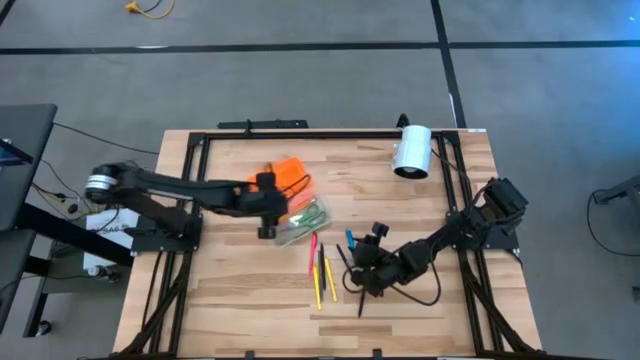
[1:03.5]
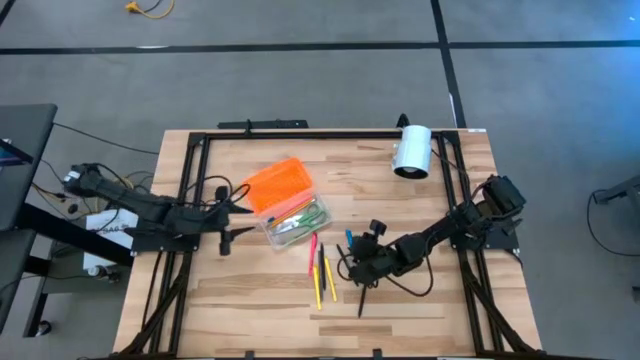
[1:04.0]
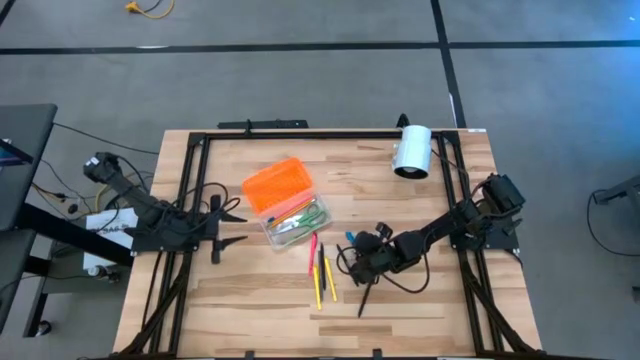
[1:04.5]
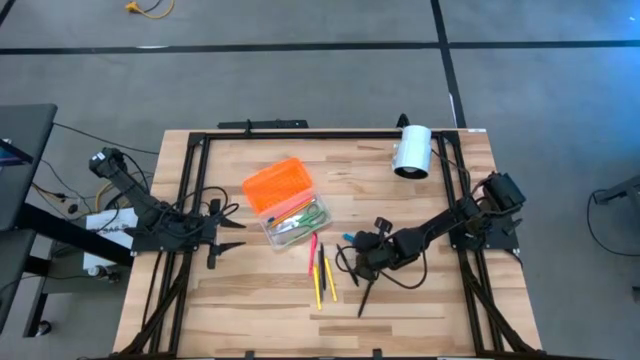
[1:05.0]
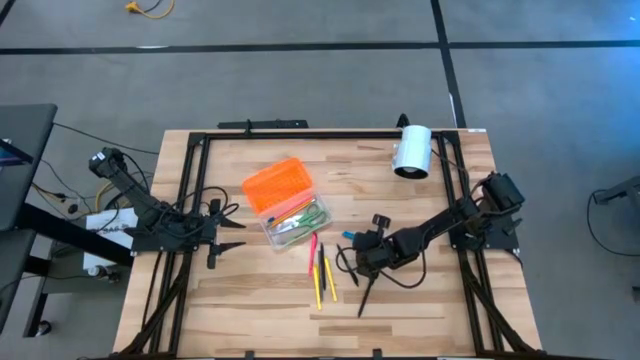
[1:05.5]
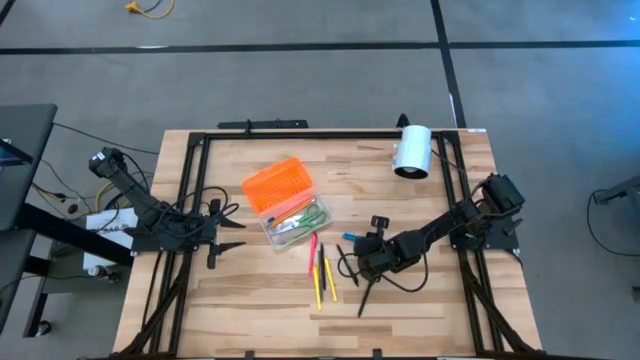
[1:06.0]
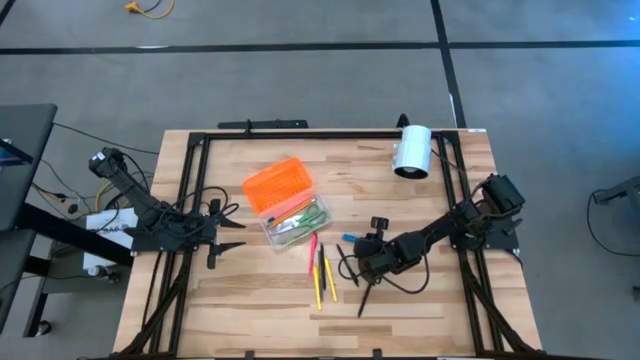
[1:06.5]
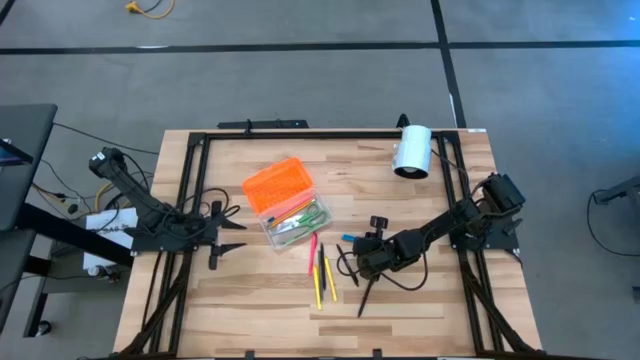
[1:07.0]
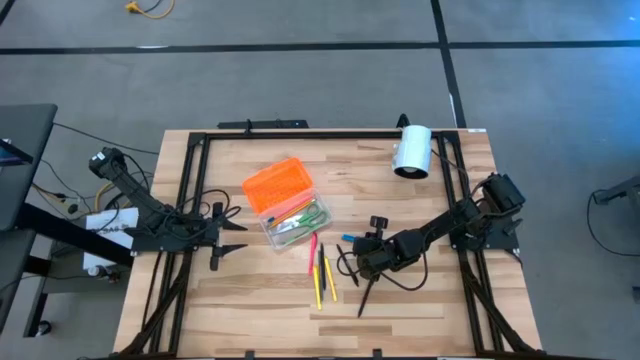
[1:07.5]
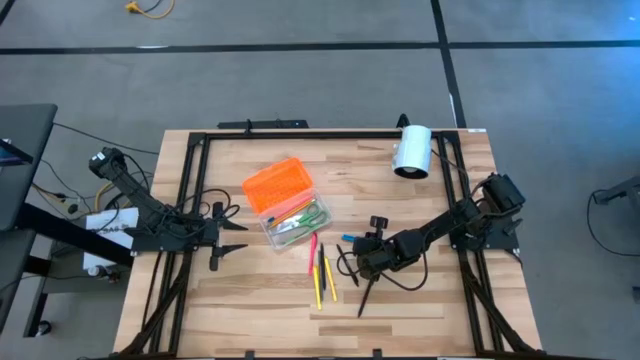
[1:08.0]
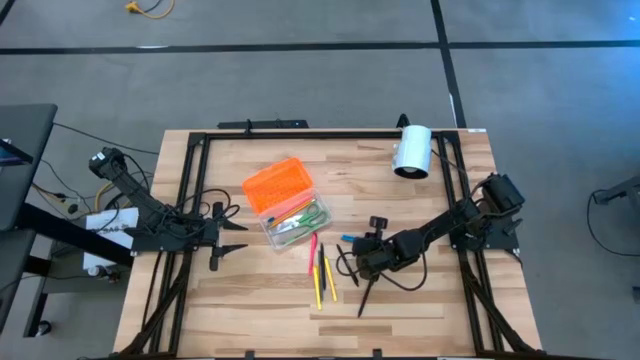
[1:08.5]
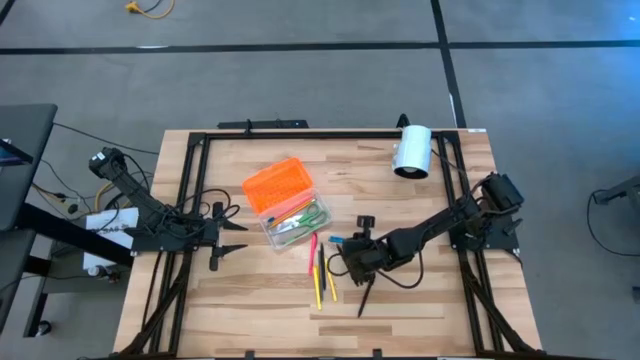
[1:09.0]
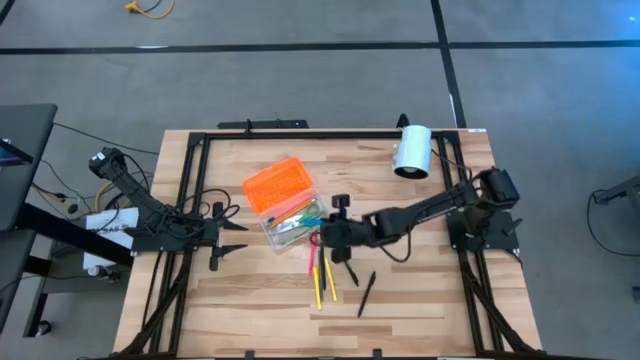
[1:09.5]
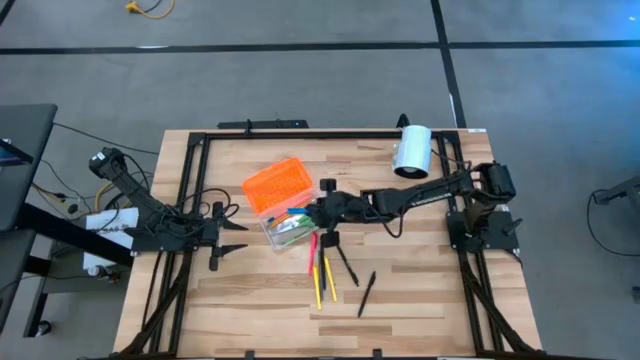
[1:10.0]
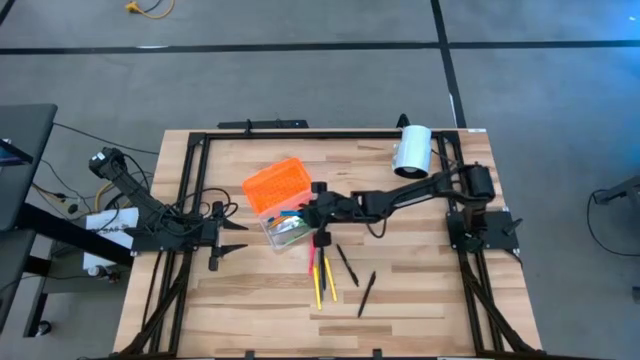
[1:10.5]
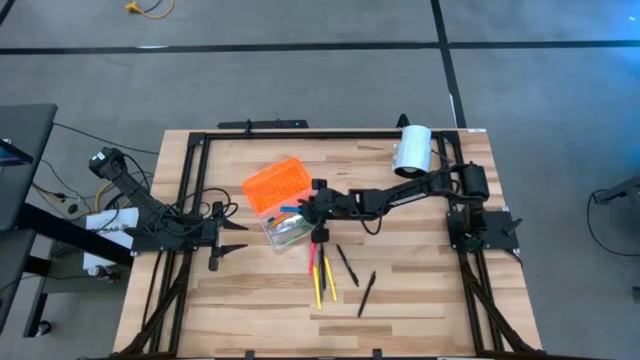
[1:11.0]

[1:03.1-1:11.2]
Task: Pick & place school supplies into a supply box
Put the blue pen into the supply box

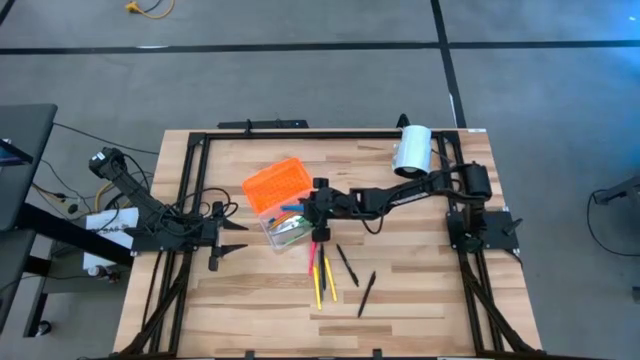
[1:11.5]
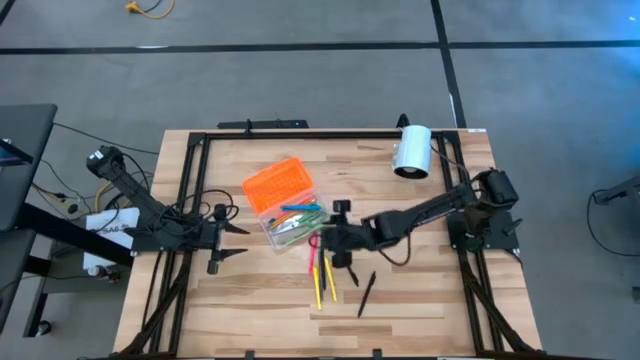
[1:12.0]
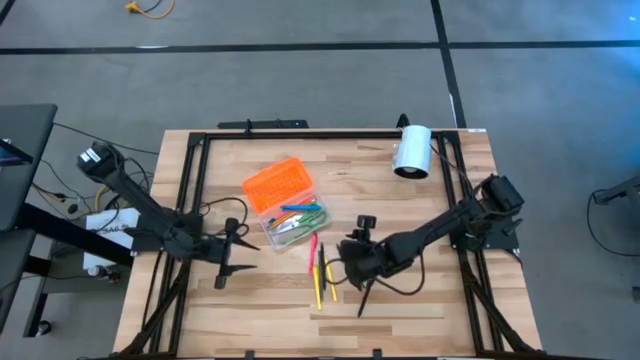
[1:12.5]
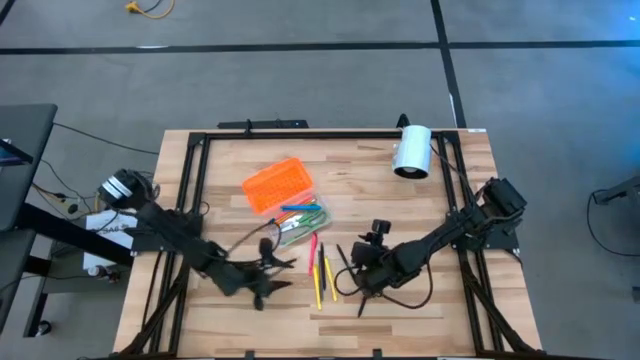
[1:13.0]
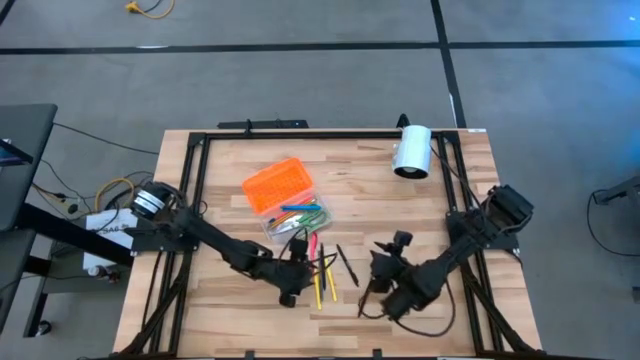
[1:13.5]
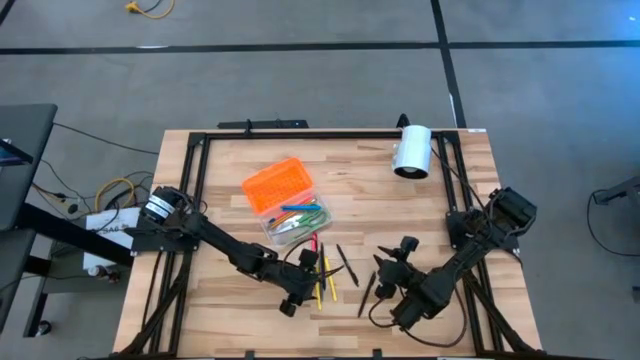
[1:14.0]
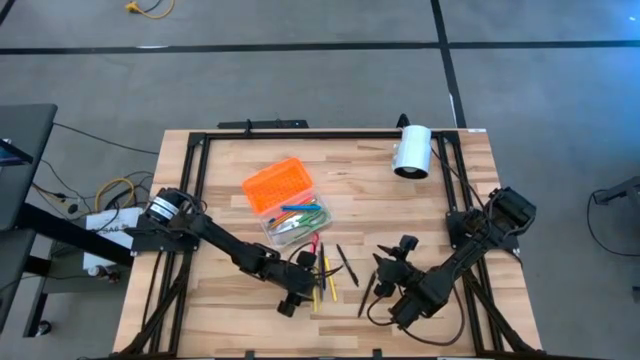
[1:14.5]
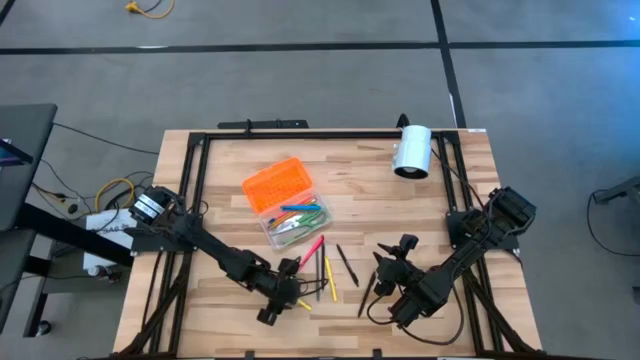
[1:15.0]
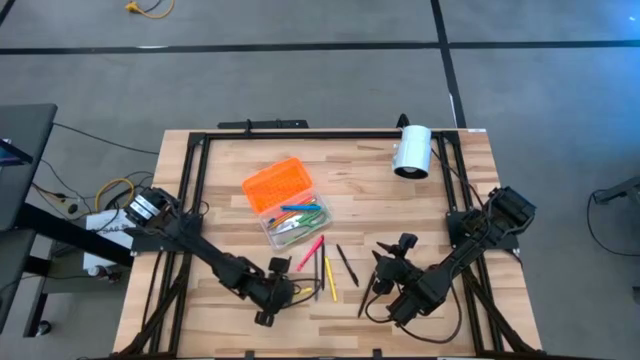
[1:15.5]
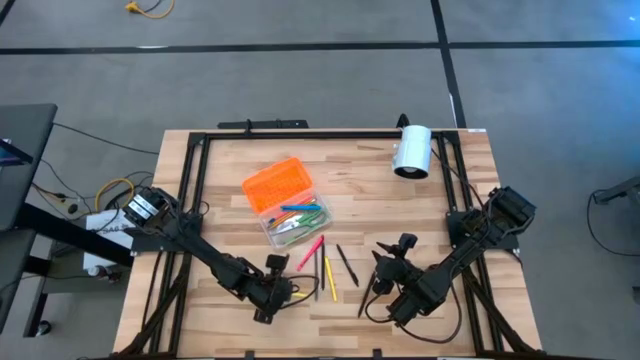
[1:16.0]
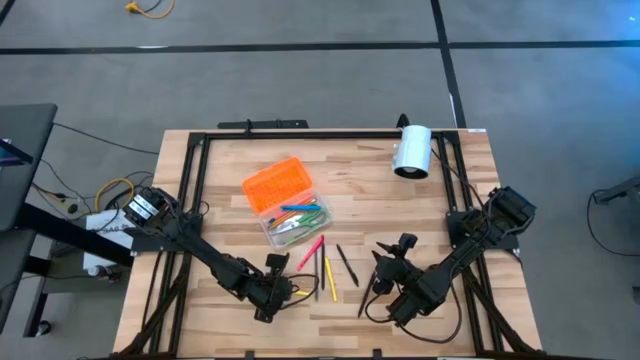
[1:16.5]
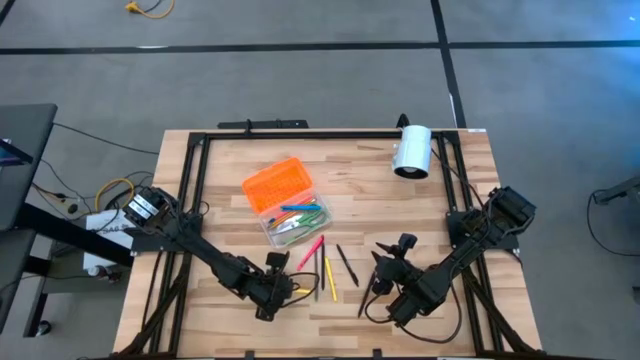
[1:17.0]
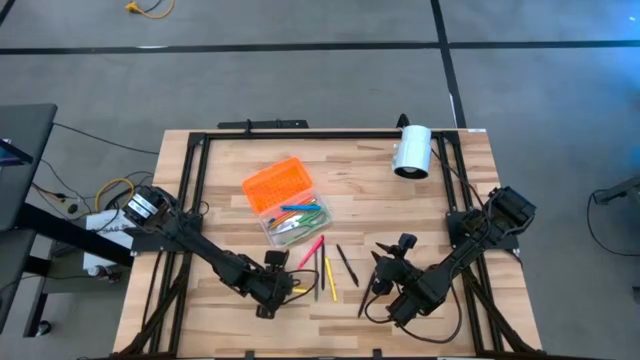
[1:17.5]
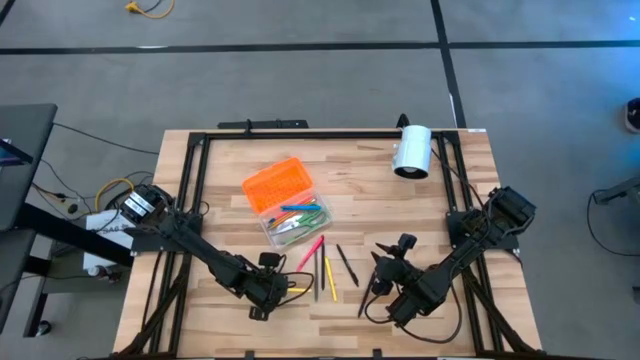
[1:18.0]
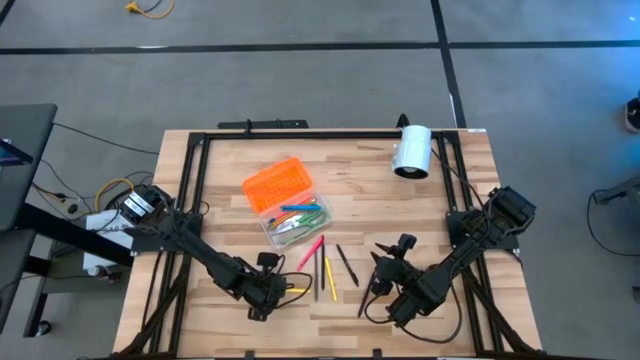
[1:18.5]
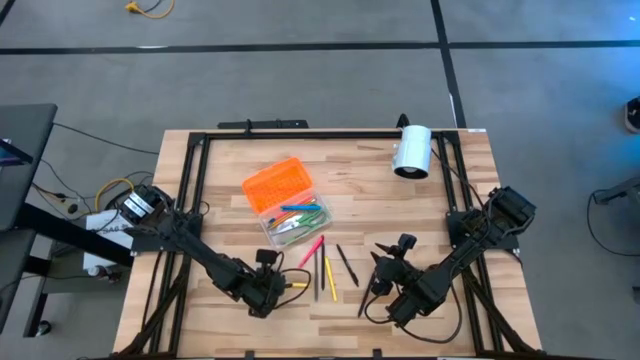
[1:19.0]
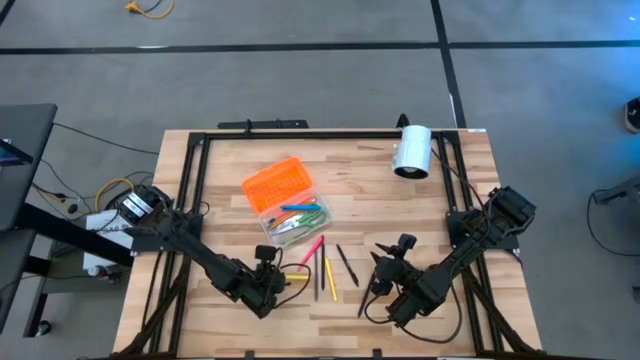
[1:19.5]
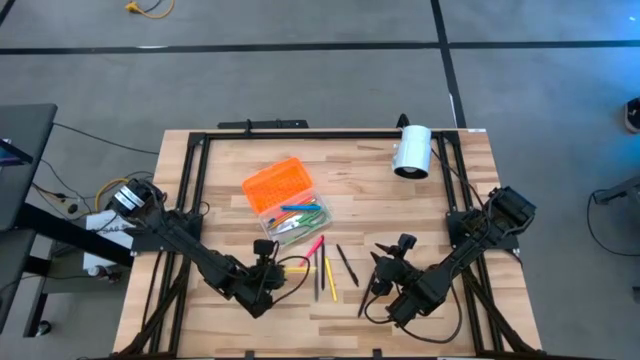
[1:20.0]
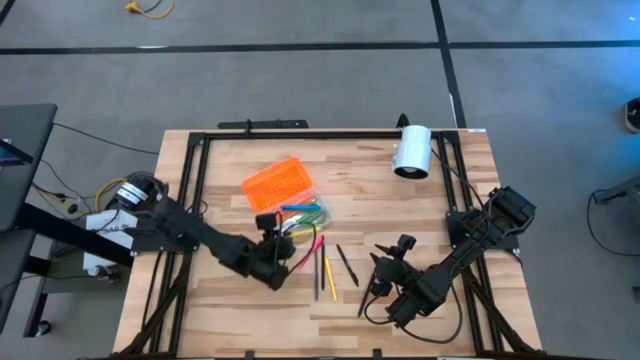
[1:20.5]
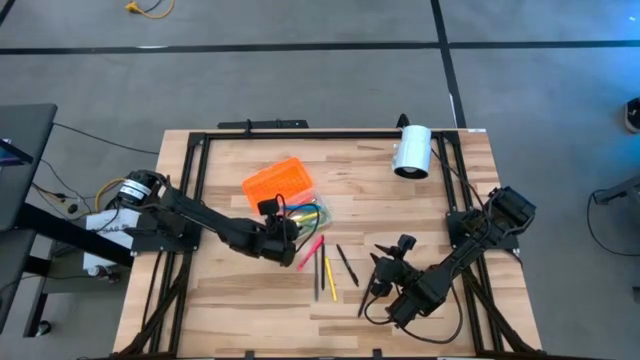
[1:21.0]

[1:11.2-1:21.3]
Put the left yellow pen into the supply box

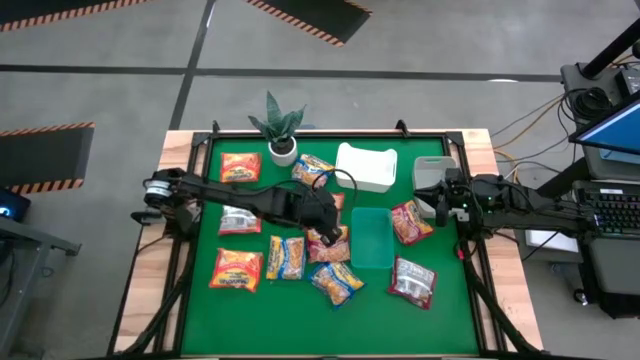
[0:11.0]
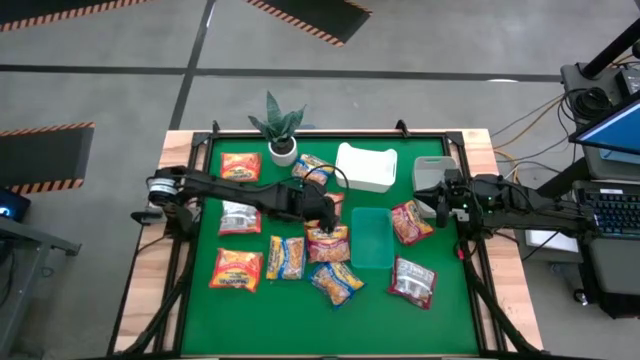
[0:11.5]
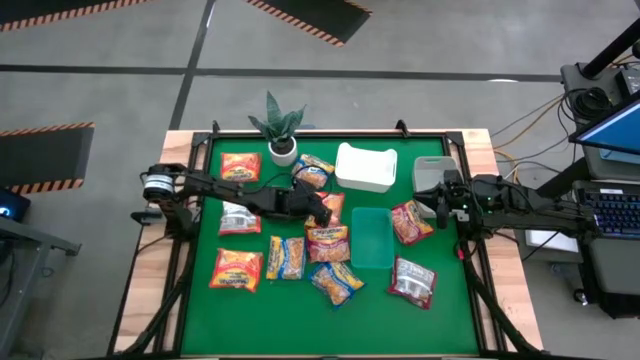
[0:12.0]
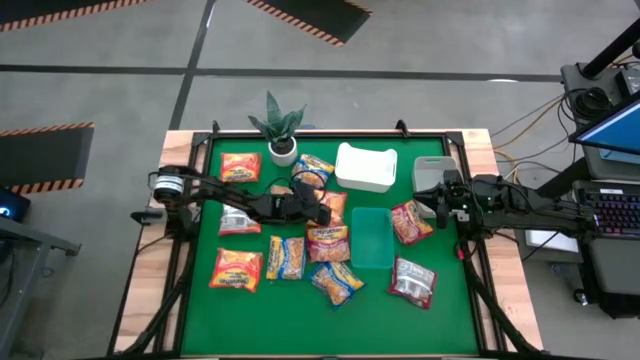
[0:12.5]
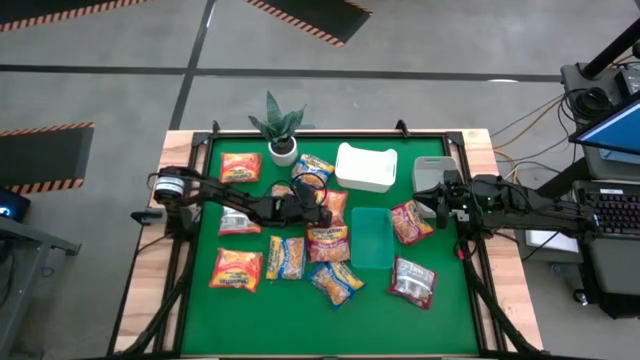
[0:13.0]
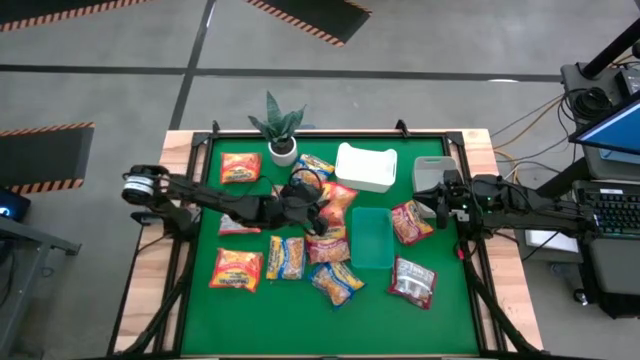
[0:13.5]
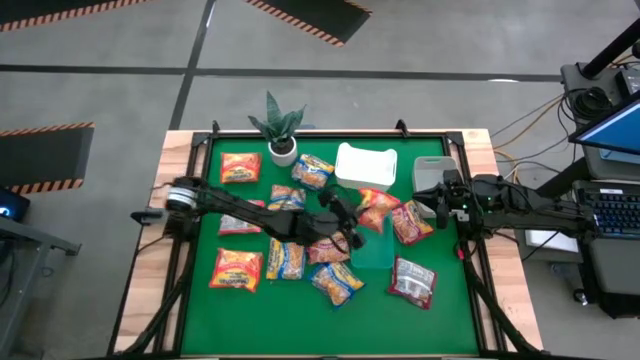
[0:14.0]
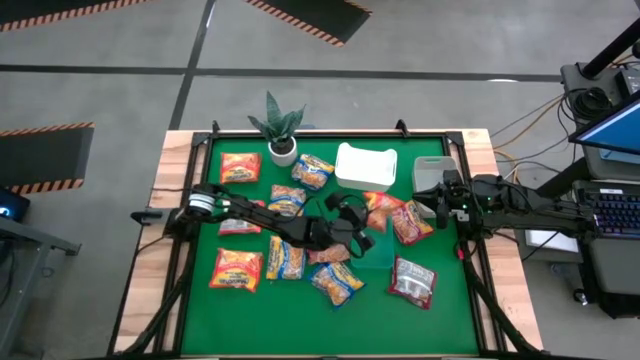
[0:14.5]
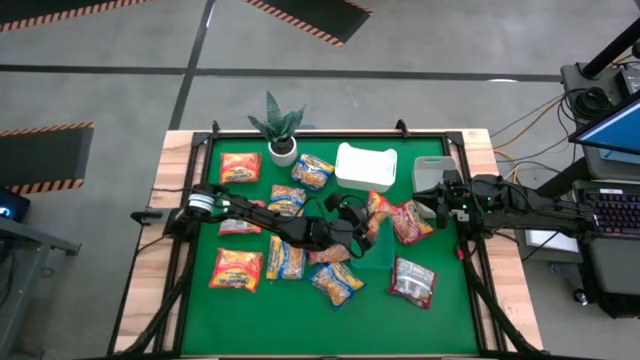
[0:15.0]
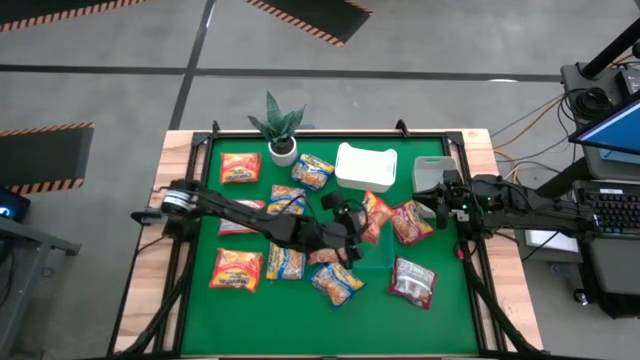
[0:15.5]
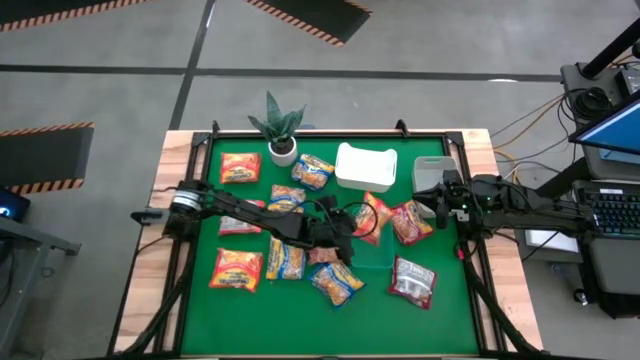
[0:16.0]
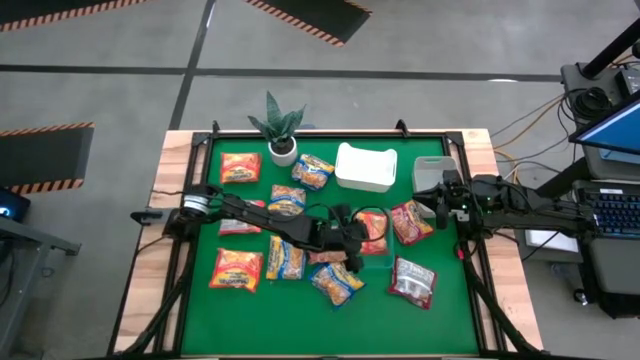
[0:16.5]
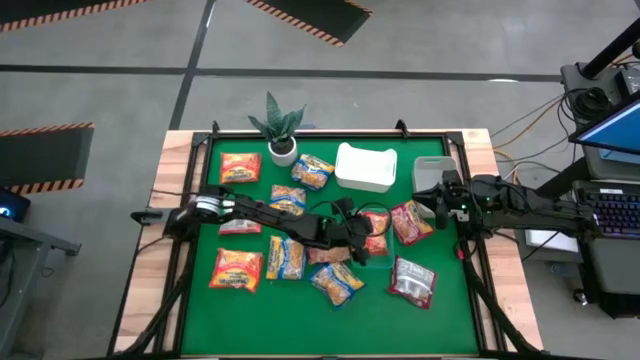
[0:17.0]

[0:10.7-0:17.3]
Task: Sort Maruchan noodles
Put the orange noodle pack into the green bin
